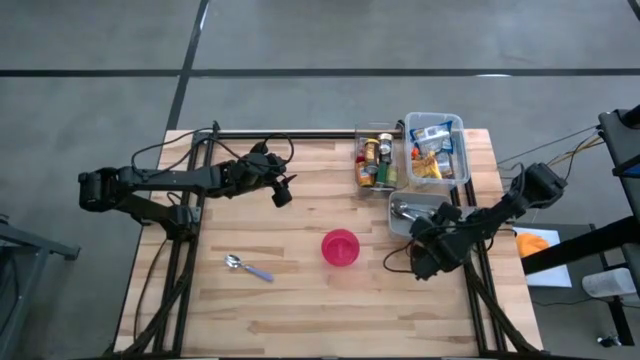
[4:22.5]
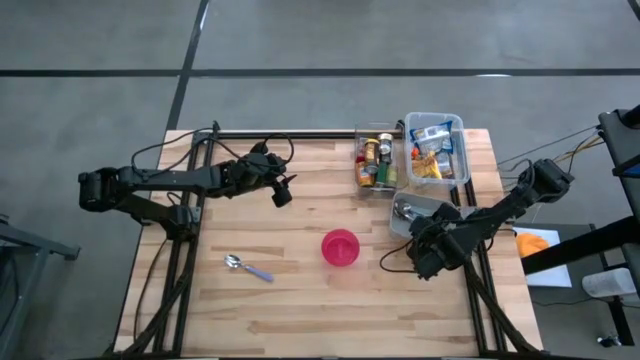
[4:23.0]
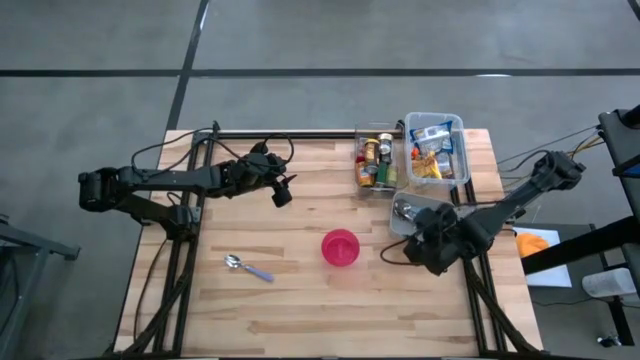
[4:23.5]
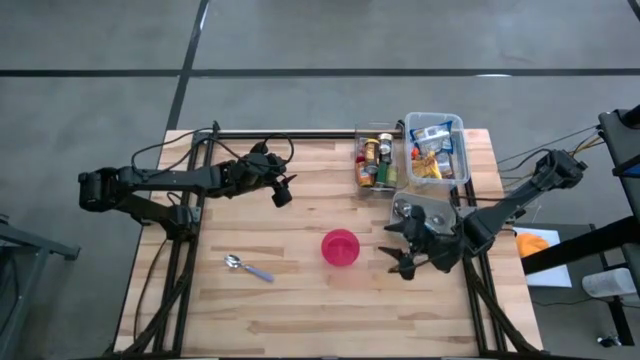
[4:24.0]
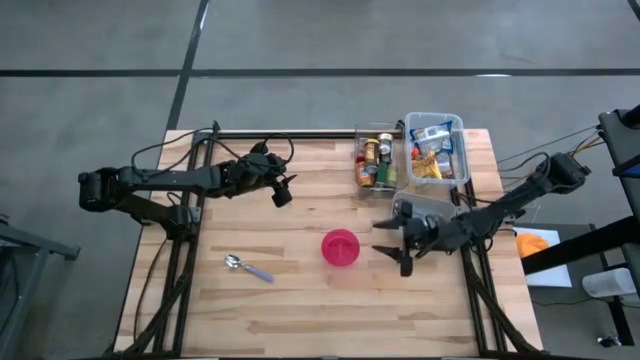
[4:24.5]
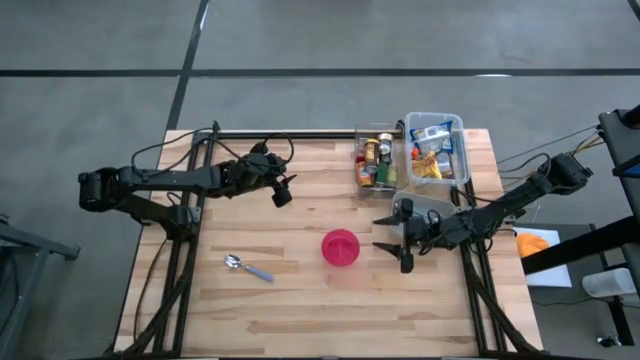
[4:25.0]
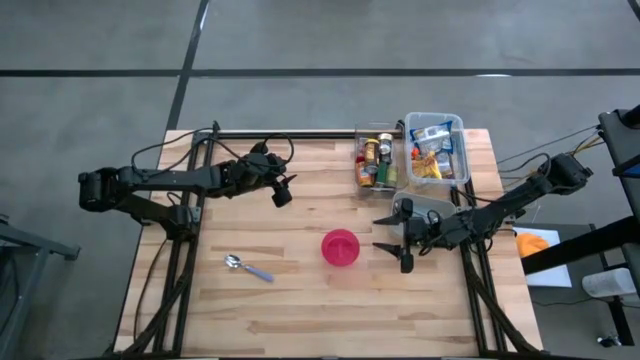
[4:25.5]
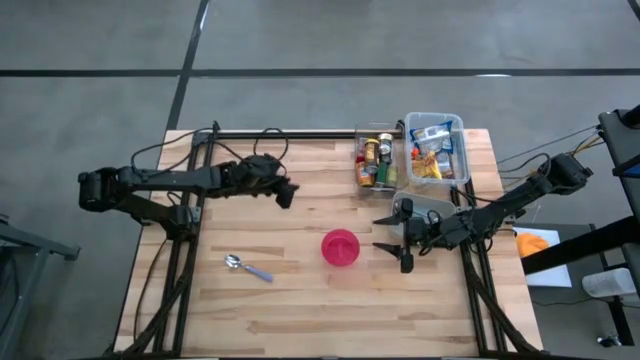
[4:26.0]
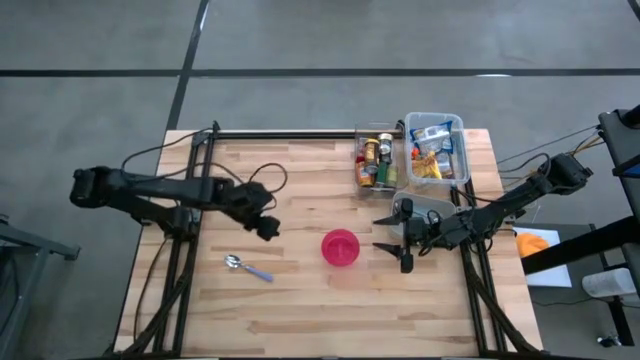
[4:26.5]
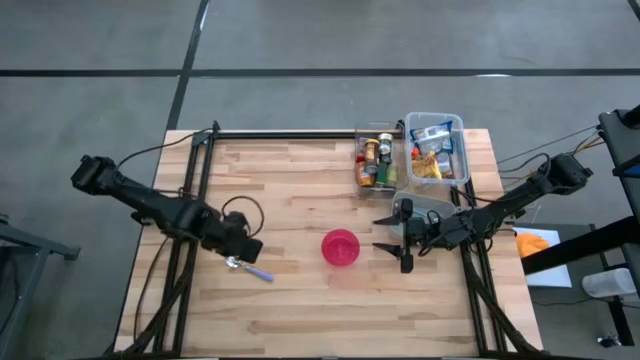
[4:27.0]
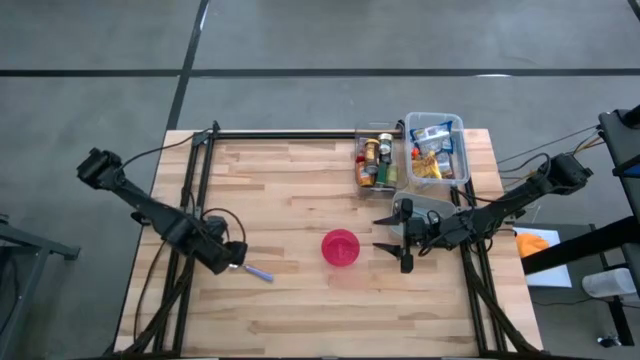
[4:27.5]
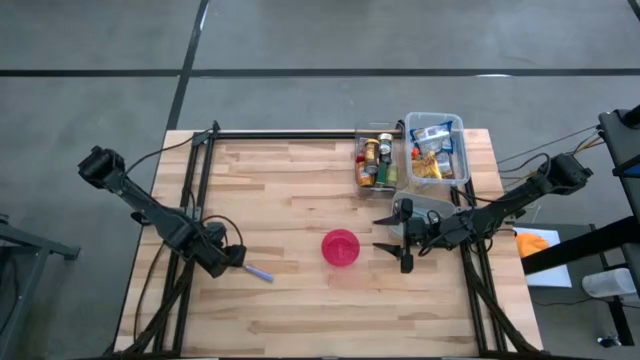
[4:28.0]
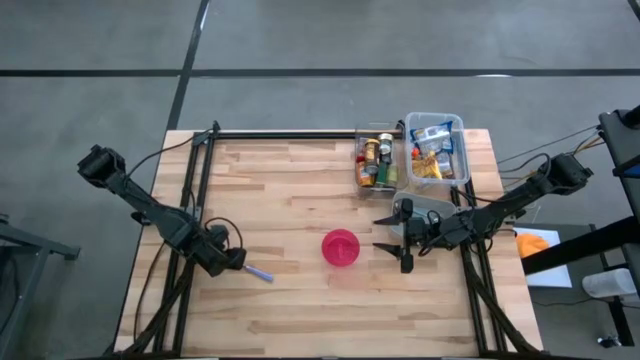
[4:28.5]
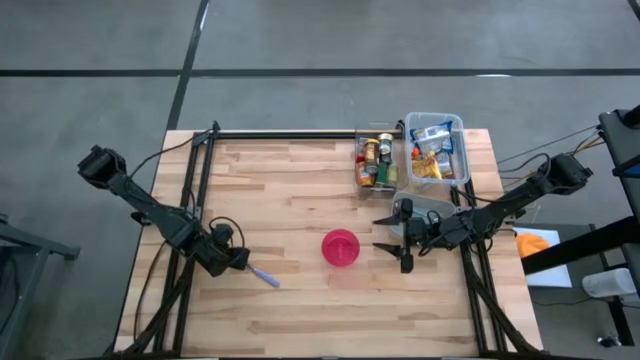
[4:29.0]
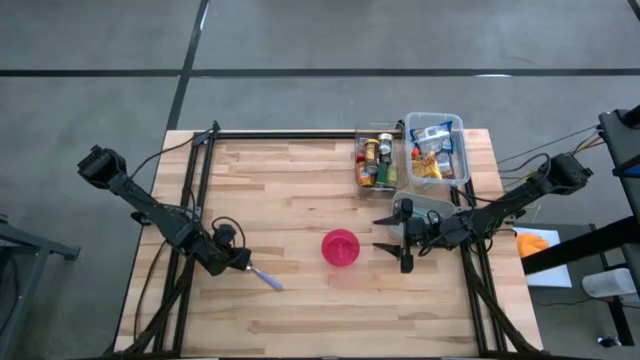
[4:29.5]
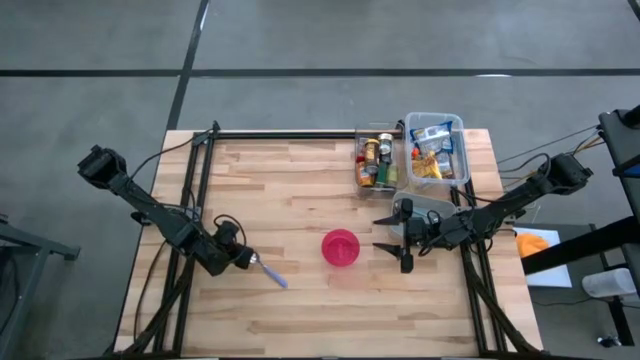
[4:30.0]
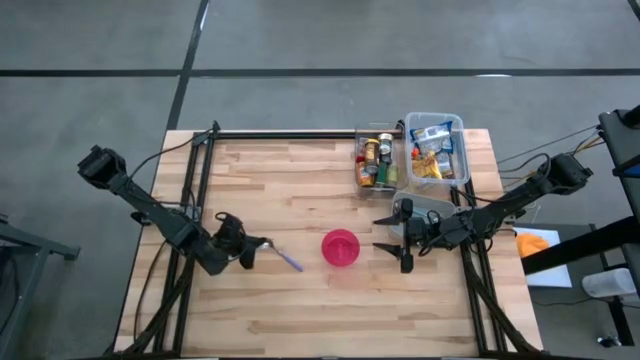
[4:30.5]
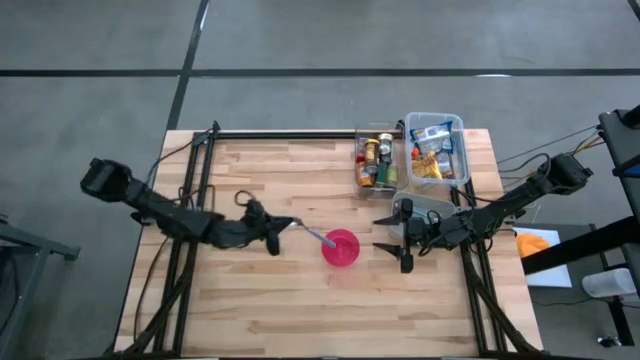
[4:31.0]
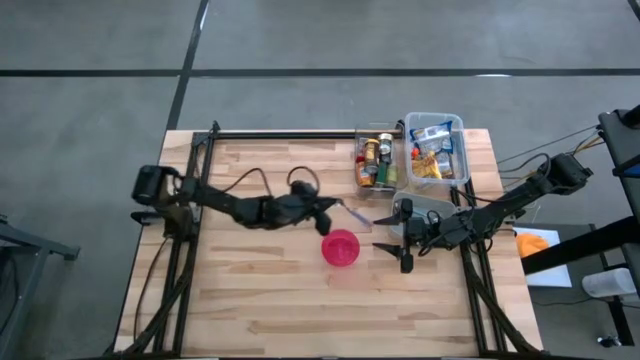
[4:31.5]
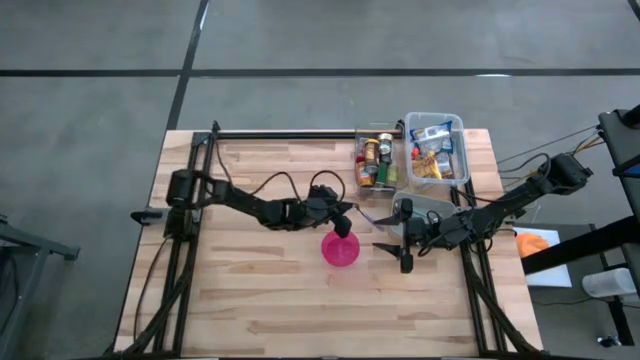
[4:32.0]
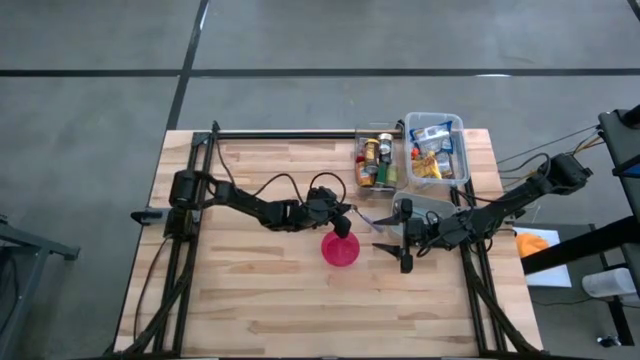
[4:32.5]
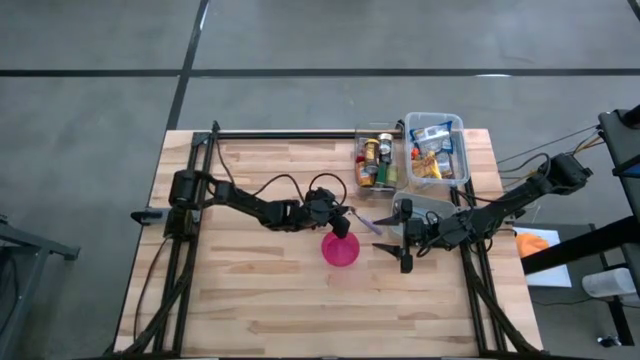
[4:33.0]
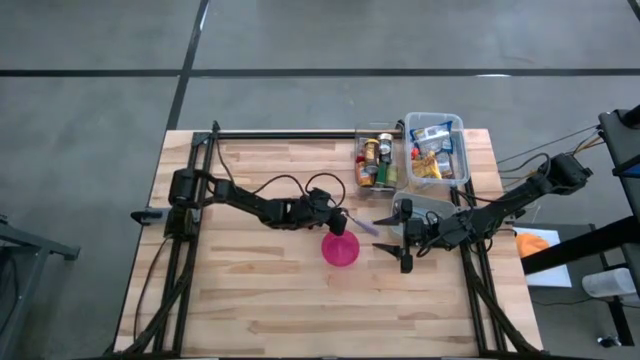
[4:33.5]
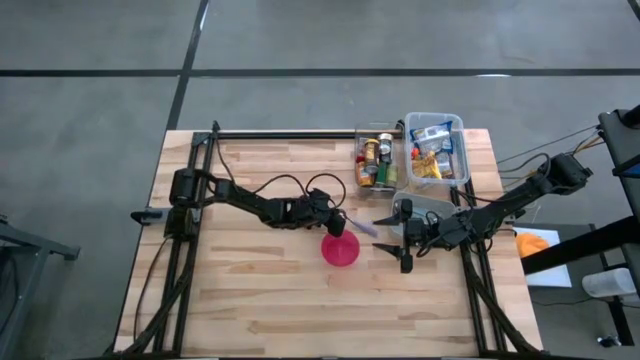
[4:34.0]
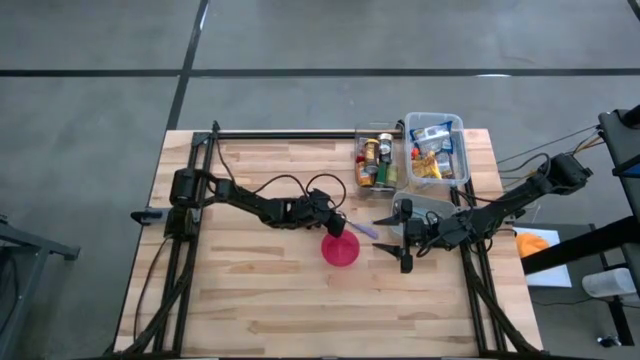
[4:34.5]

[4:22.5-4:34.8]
Put the purple spoon into the gray bin
